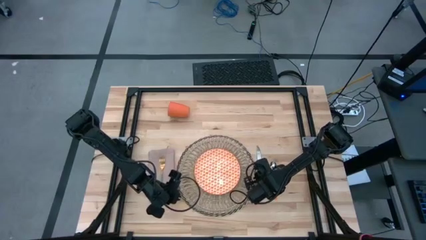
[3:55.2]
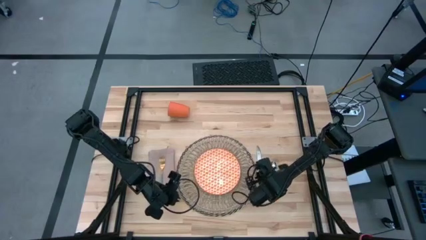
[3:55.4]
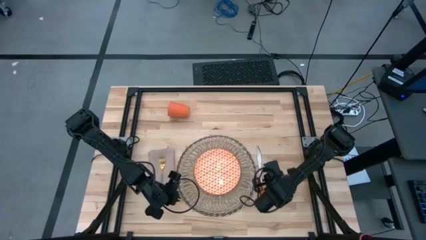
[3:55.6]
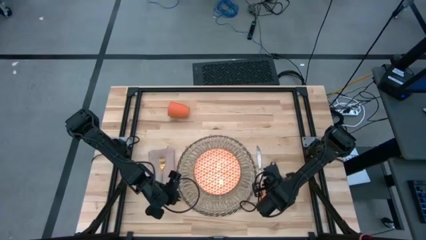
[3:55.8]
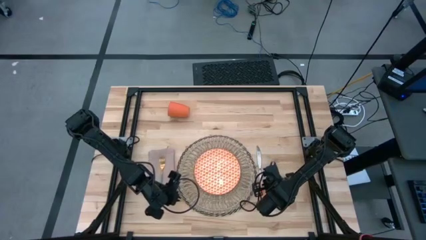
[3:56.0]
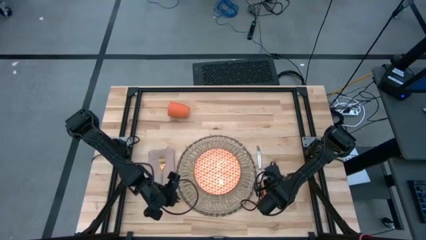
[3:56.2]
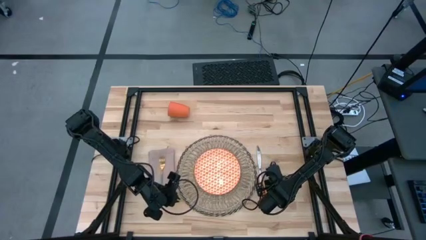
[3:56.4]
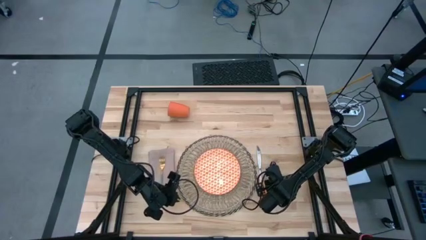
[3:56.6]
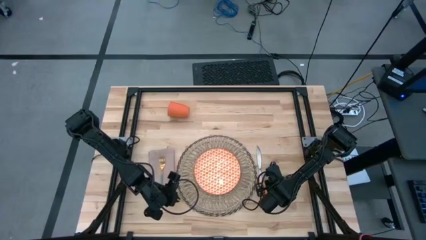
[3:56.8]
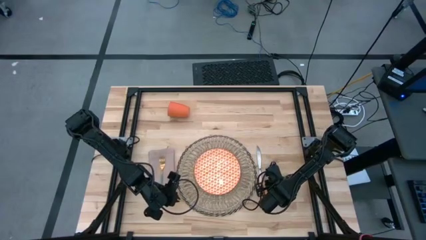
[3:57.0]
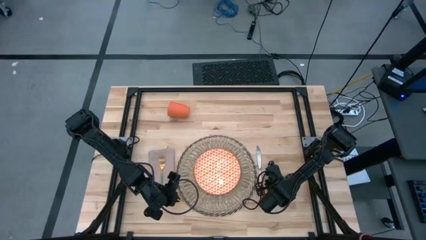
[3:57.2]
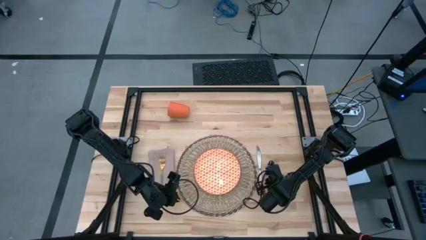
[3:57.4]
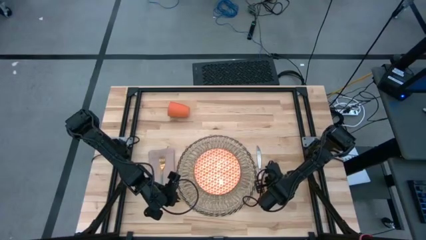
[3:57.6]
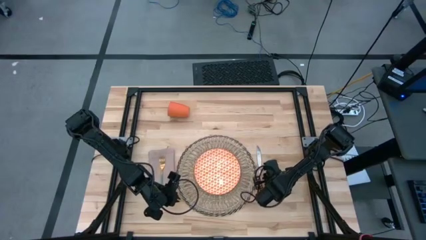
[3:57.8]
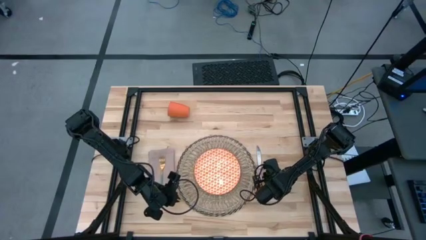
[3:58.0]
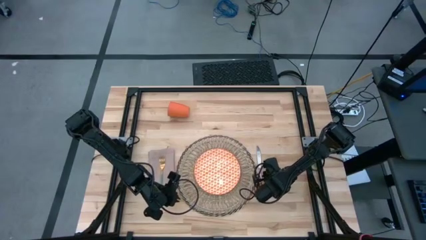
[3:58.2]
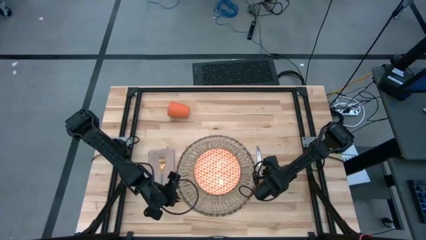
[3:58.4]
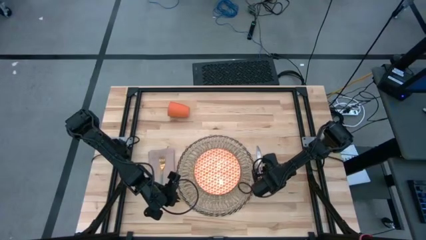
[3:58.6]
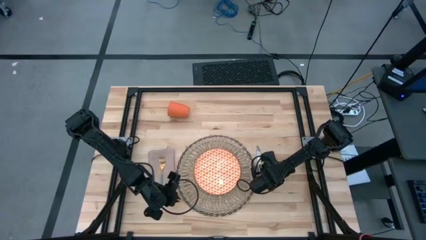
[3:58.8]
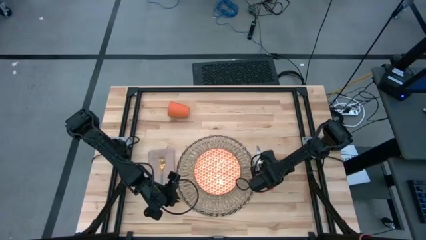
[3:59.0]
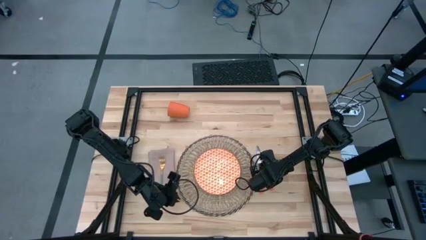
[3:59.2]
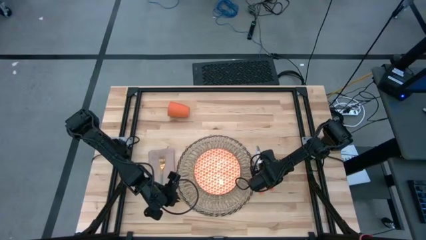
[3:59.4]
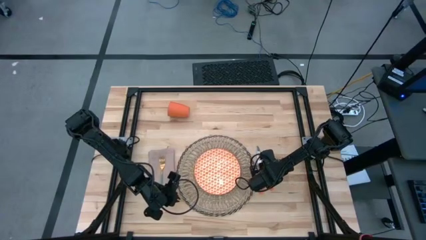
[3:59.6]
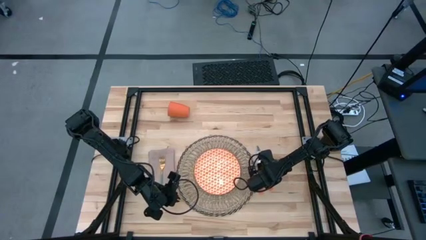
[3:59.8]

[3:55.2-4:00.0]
Task: Set table place
Adjust the spoon

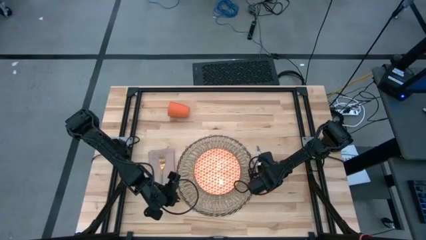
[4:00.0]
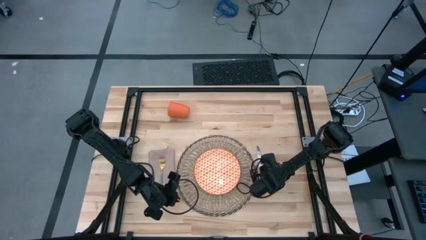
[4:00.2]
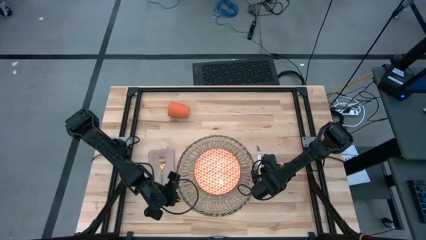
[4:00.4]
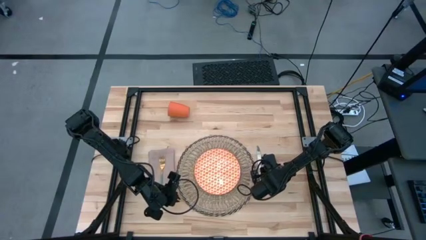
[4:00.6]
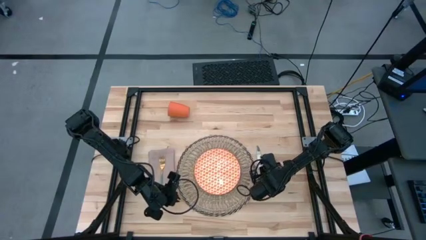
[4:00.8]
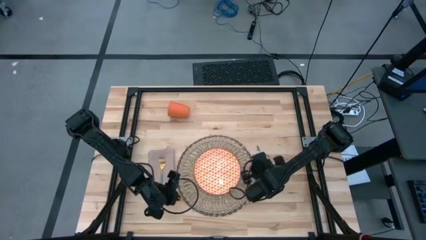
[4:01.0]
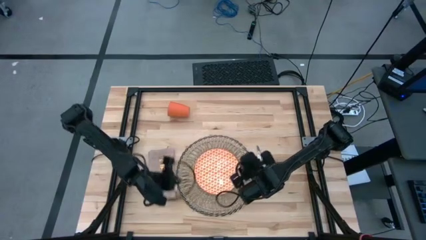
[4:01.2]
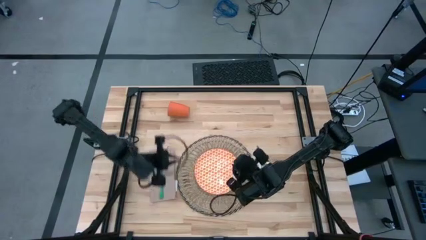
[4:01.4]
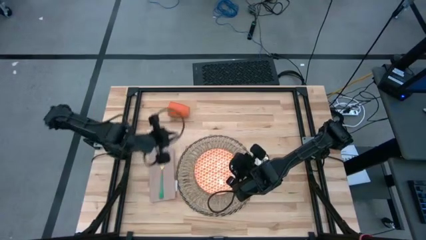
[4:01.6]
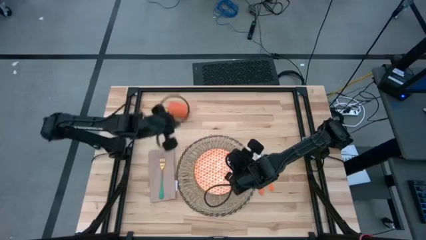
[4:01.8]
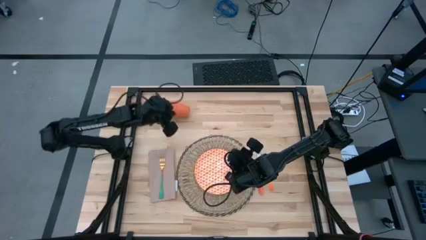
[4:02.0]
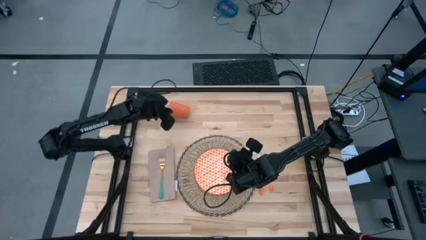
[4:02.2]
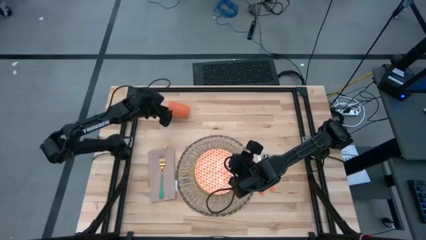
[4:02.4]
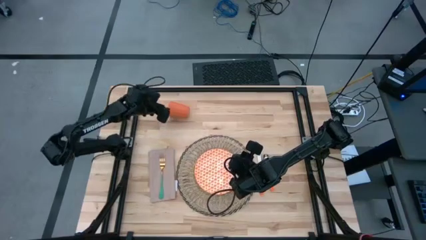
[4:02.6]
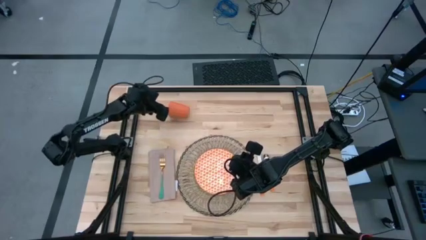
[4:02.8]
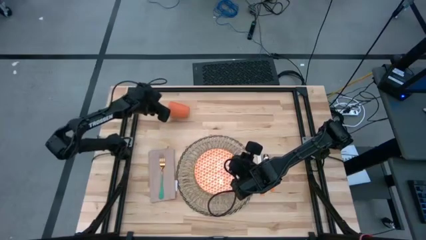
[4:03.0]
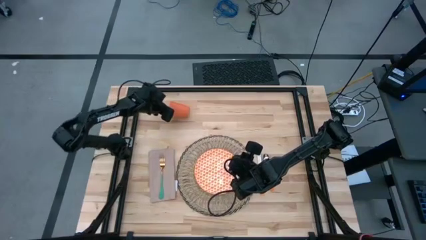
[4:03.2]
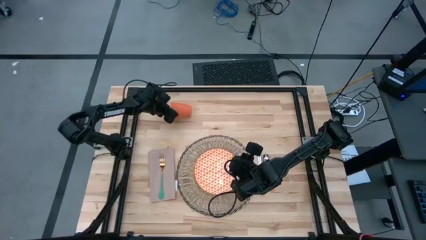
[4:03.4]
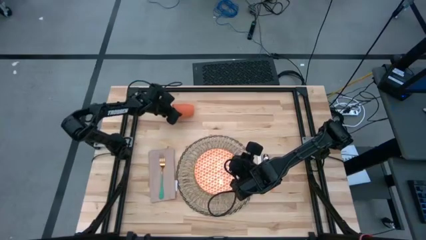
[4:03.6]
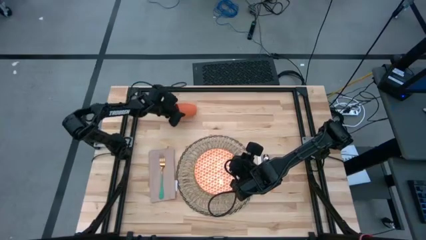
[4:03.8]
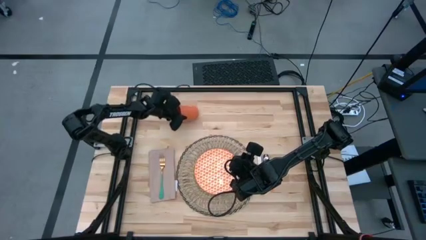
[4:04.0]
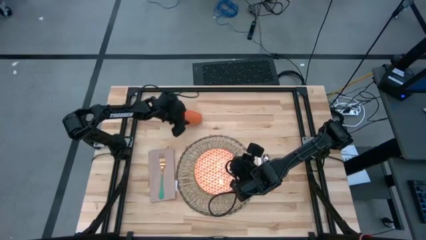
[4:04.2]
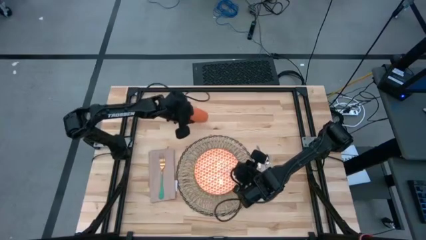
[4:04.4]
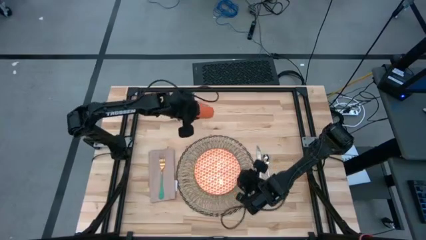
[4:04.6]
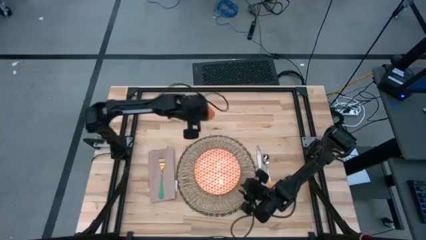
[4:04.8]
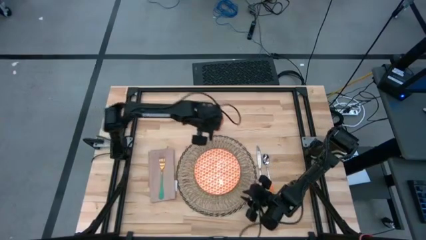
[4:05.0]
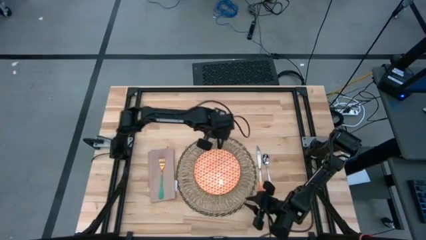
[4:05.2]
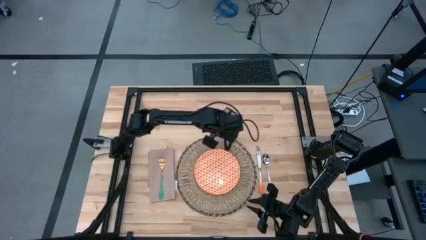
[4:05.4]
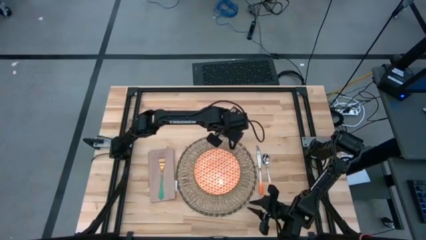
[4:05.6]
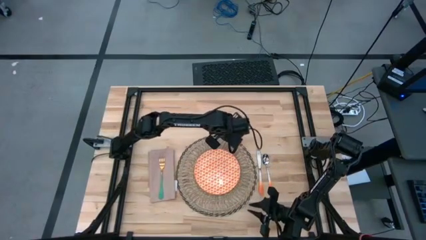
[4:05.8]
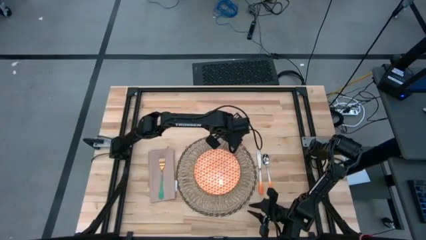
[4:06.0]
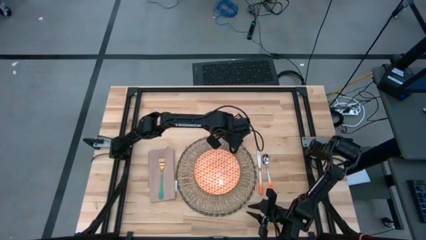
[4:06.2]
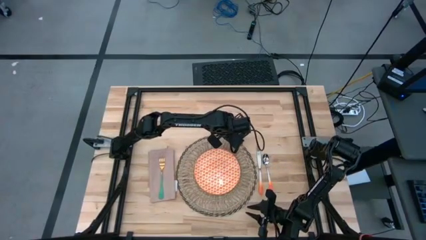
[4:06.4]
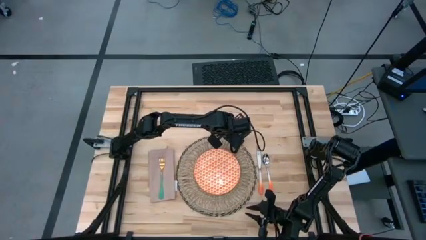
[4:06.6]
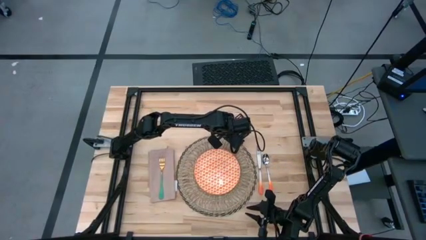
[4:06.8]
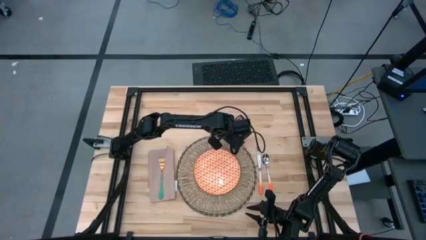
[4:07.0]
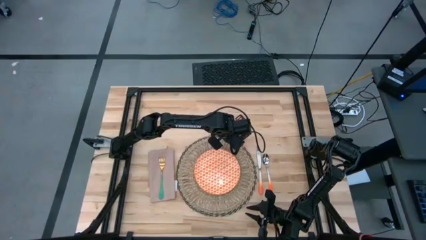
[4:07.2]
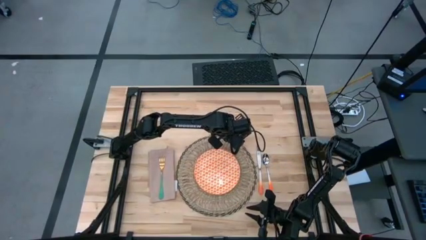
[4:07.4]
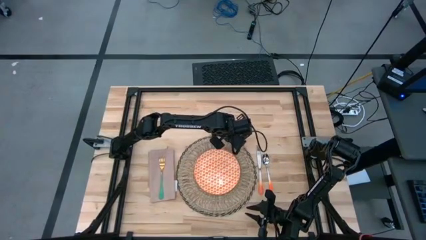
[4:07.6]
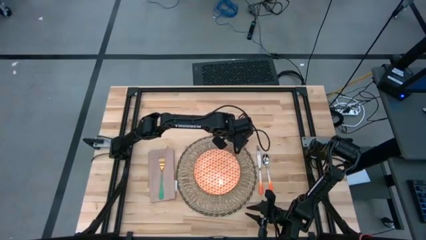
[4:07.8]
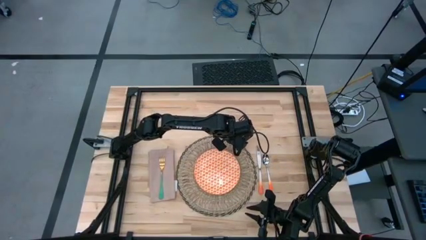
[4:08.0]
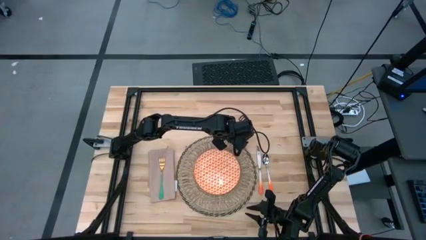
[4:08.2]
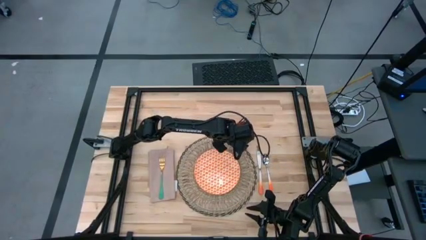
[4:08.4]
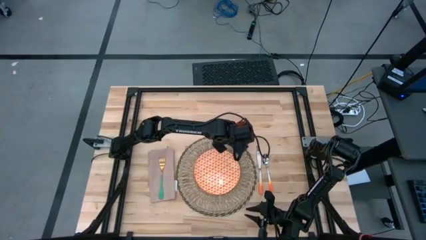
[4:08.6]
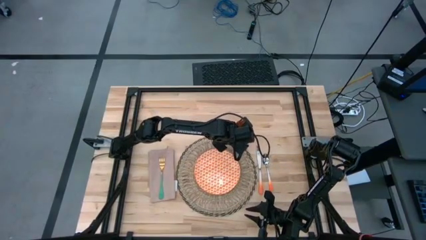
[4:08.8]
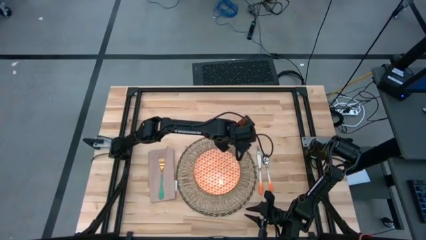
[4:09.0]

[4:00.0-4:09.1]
Put the cup on the table to the top right of the mat

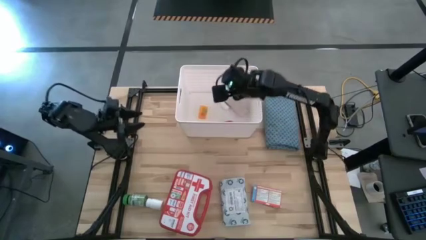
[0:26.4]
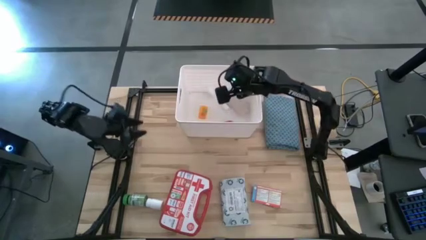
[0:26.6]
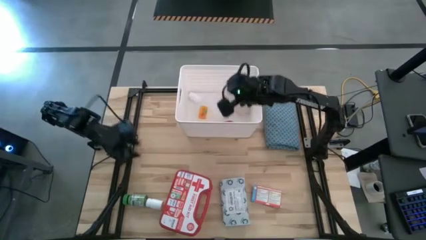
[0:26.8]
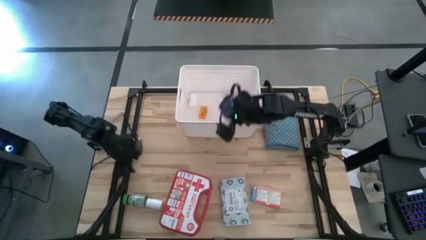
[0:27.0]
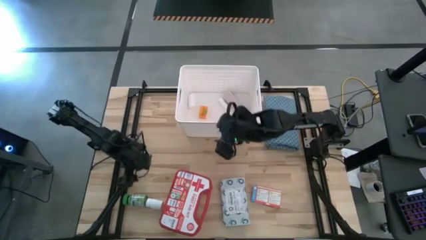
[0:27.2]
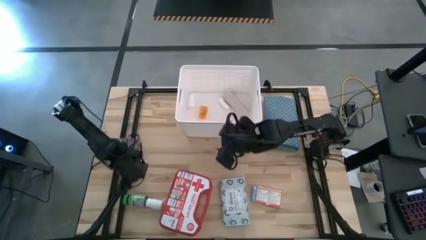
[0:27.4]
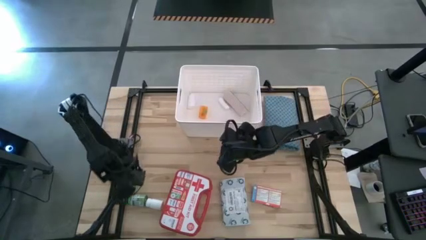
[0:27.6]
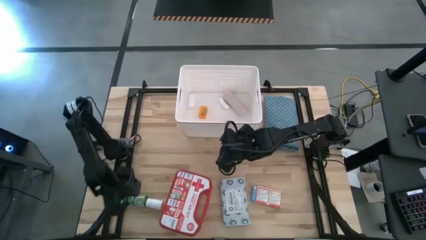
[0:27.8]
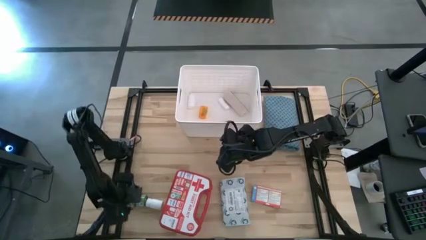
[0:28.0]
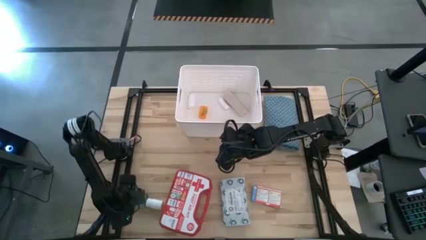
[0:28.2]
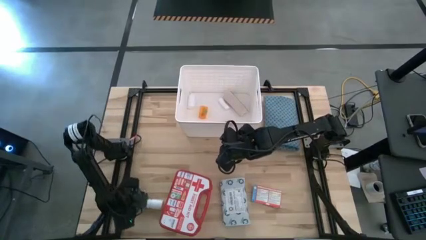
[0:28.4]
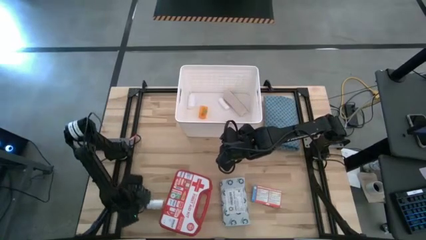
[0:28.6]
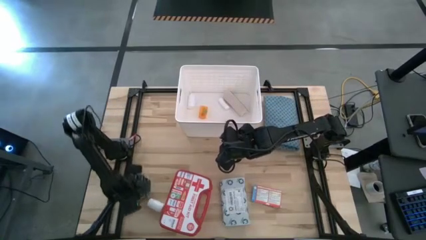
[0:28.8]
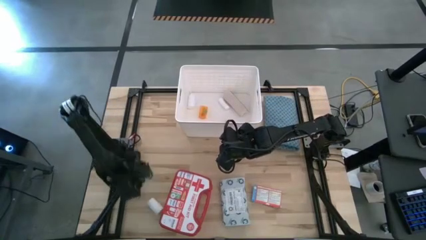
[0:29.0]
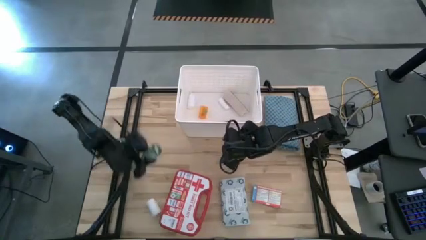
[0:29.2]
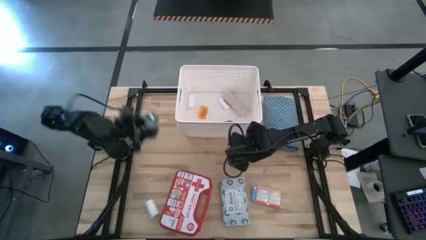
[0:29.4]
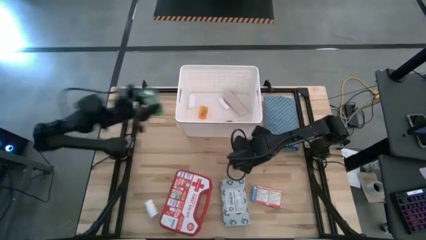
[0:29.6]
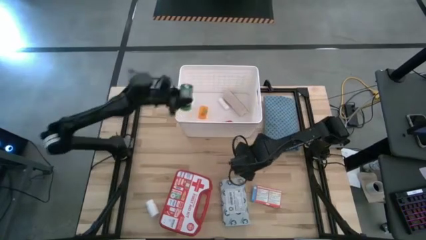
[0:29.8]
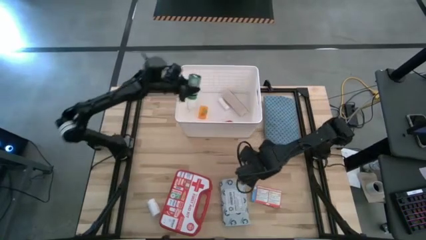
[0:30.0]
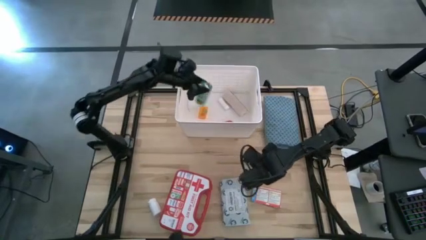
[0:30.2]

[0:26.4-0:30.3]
Task: Pick & place medical supplies in basket/bin
Put the green pill bottle into the white bin
